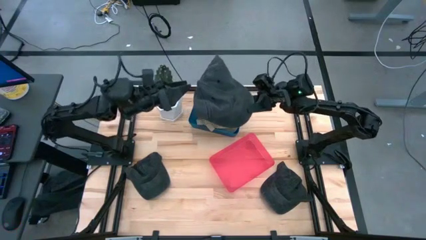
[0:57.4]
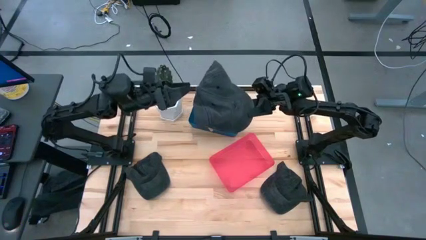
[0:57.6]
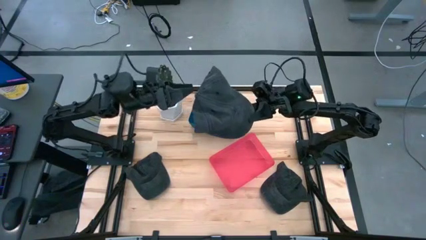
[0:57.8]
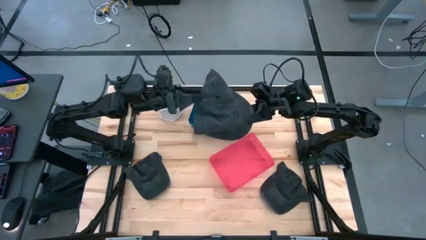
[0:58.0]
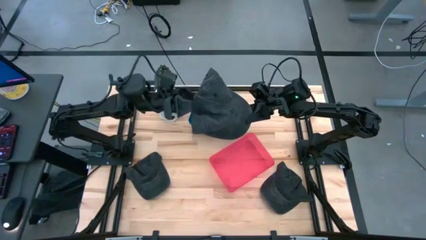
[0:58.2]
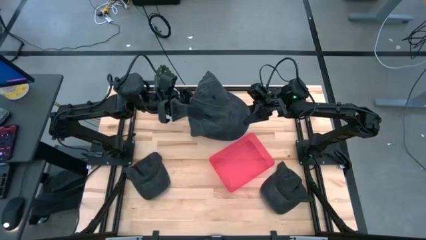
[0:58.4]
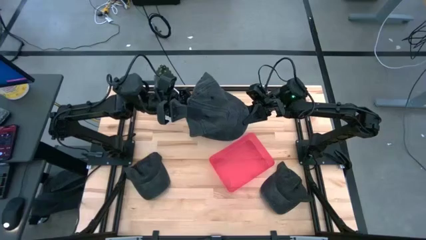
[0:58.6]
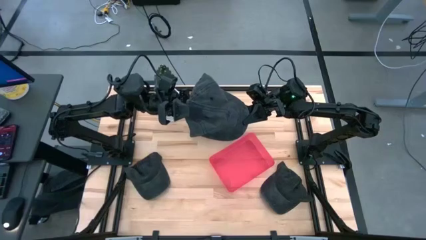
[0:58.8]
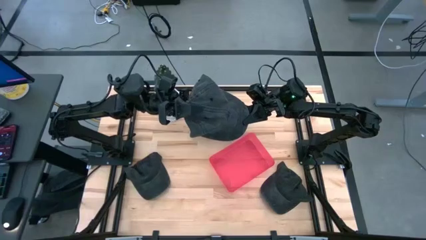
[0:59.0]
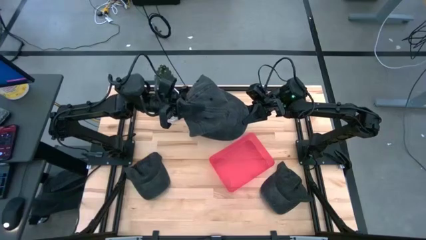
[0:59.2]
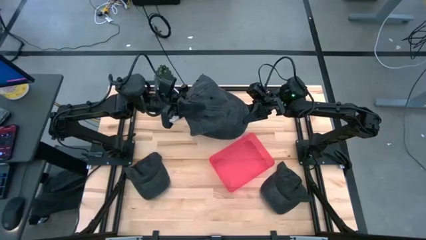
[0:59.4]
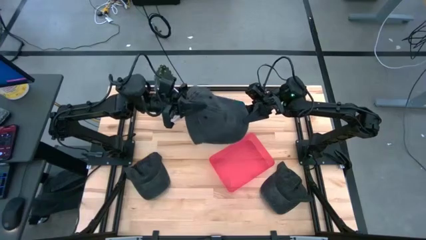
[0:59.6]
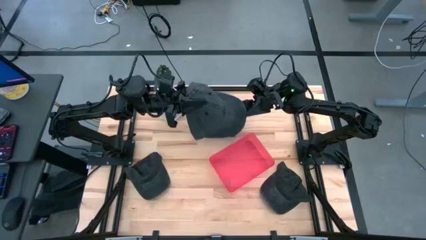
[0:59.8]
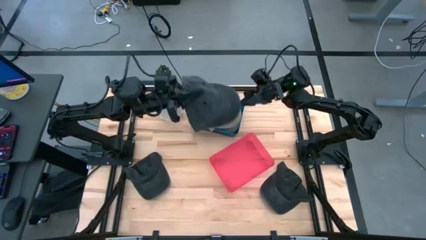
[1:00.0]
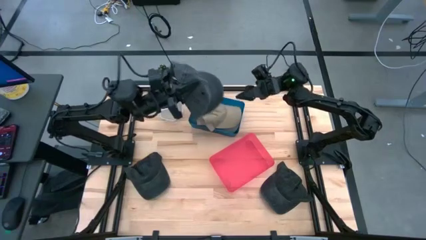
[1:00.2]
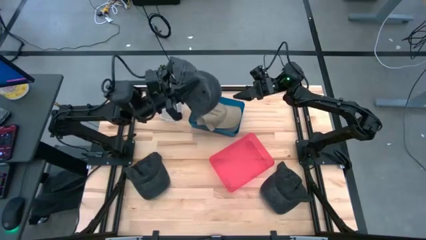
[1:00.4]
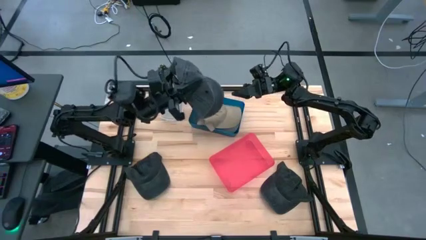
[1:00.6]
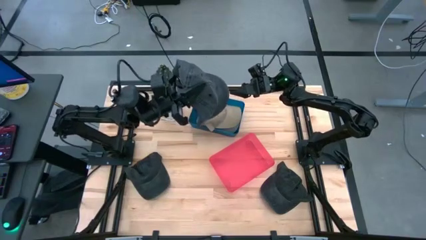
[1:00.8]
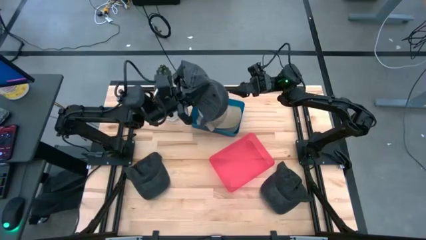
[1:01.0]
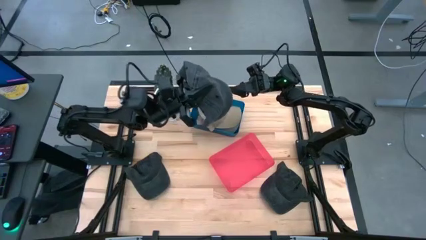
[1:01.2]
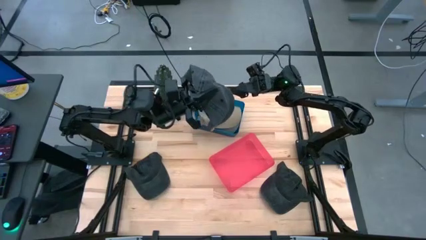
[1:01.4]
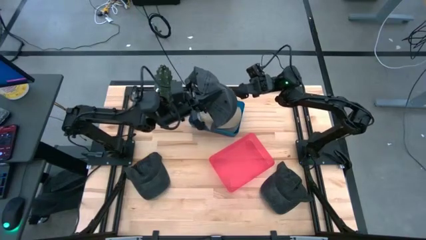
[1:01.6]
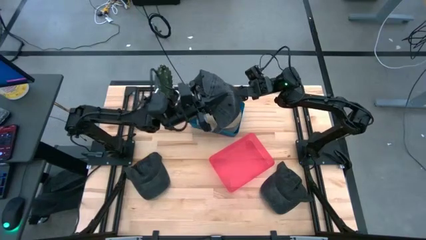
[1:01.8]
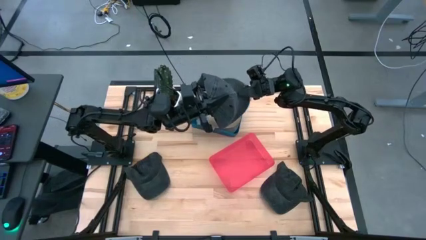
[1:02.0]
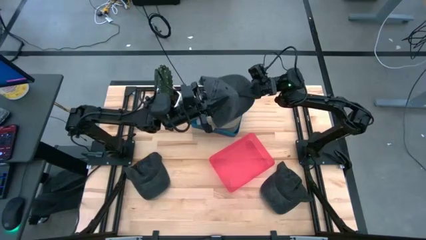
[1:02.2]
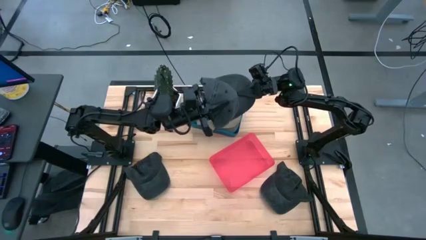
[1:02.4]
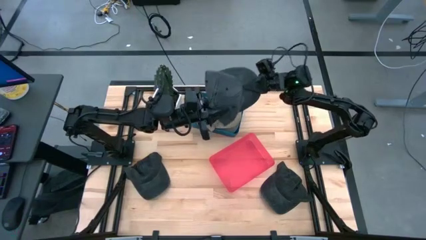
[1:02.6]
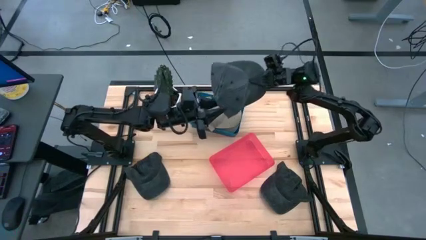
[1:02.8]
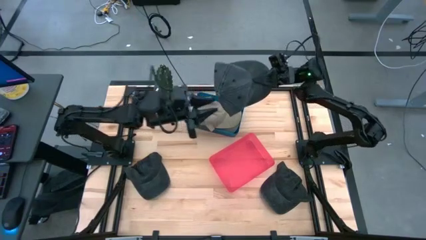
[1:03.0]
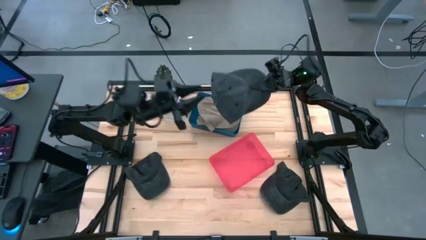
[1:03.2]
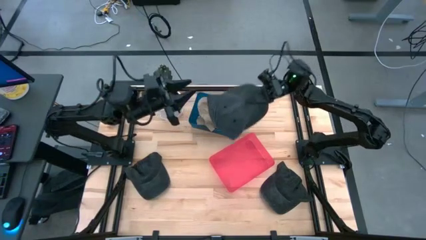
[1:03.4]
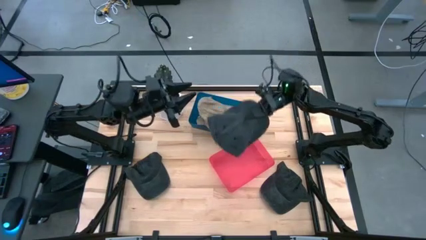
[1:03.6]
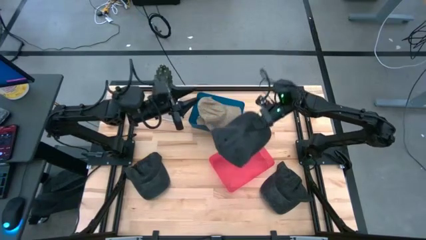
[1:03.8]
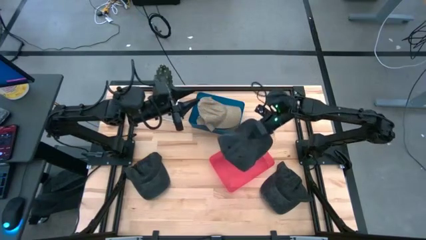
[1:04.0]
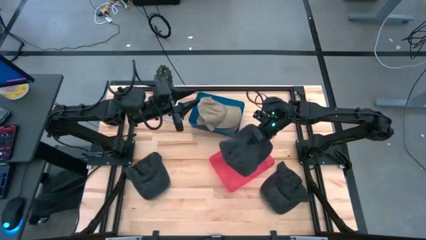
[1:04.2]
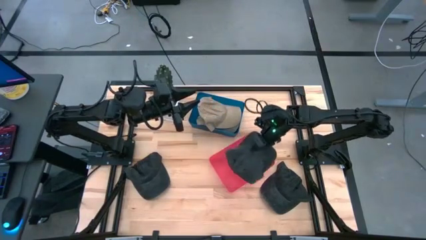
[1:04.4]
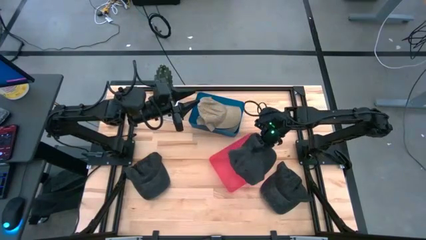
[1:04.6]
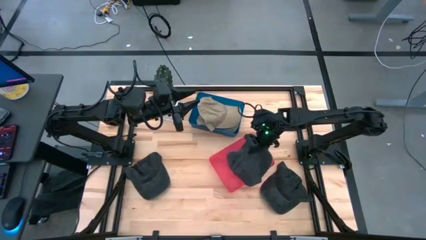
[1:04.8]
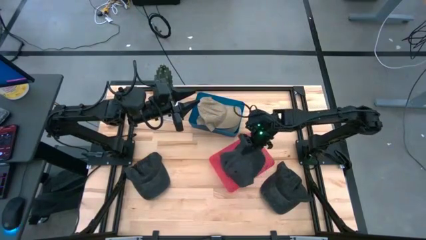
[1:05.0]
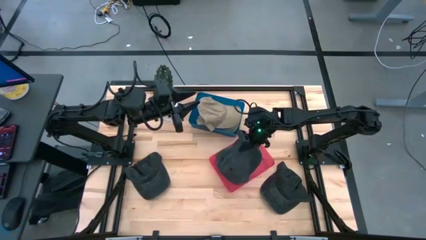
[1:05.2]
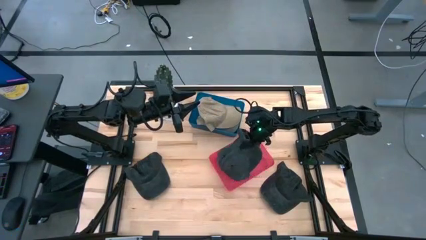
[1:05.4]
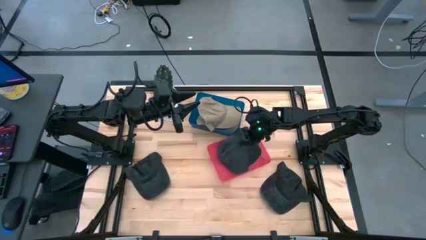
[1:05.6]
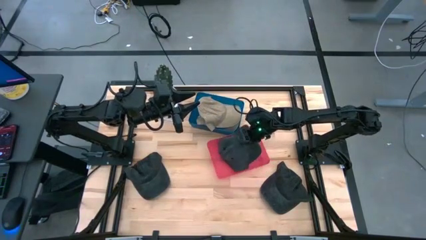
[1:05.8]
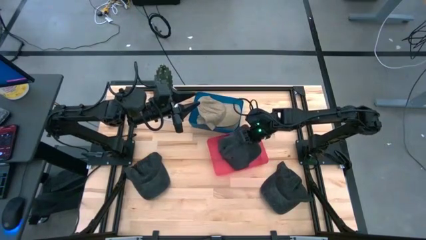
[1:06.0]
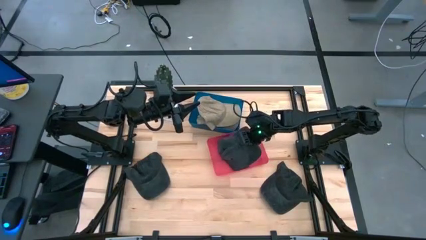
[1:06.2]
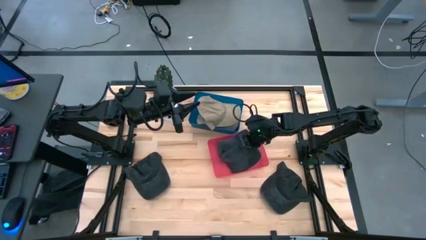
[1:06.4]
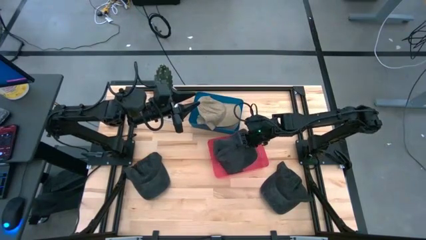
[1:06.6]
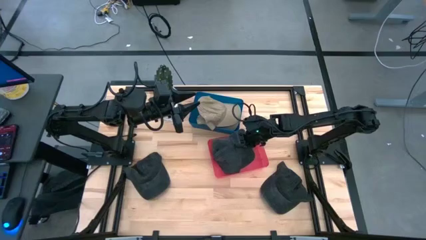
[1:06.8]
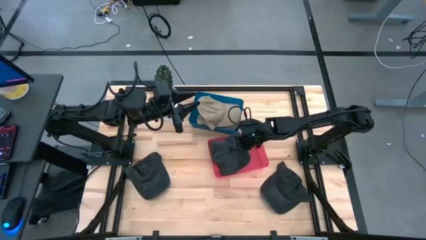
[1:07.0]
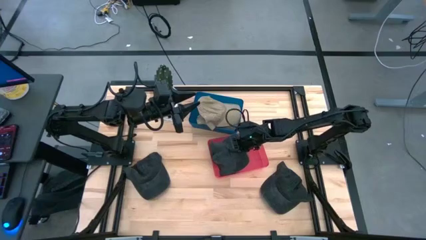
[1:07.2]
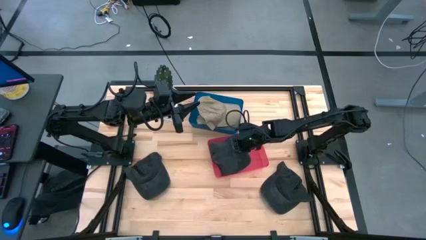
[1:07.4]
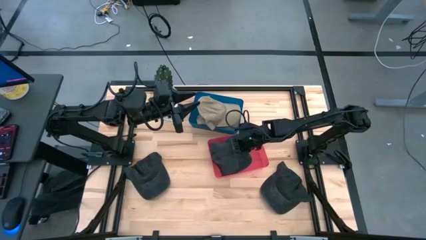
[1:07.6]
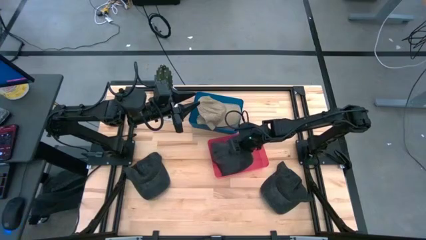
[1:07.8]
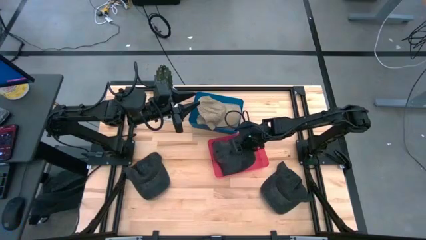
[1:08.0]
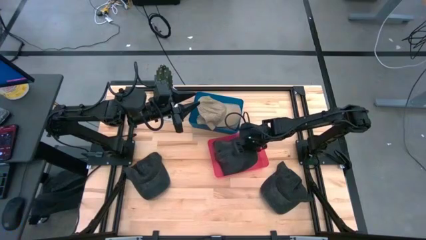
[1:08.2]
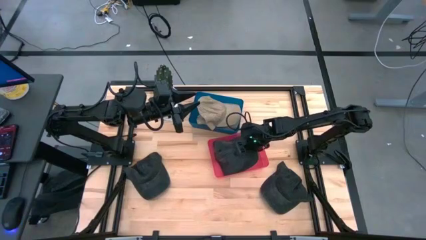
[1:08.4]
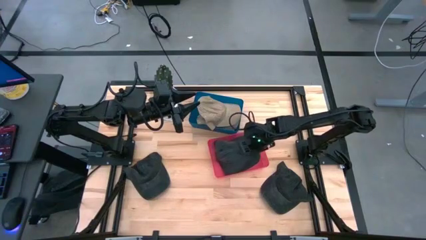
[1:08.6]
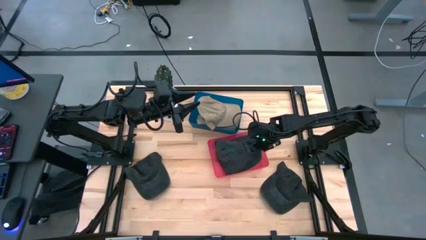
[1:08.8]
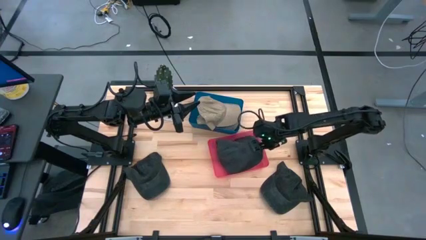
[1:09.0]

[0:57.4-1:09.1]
Task: Pick & Place hat
Put the middle black cap into the red bin

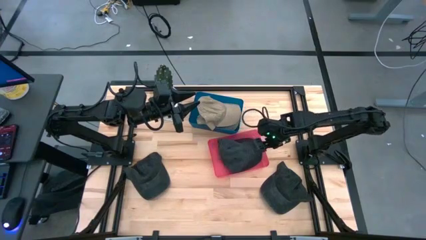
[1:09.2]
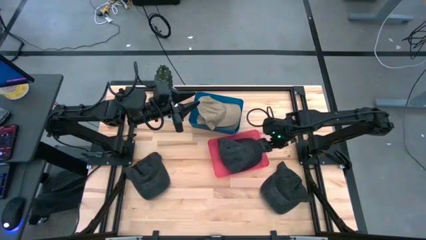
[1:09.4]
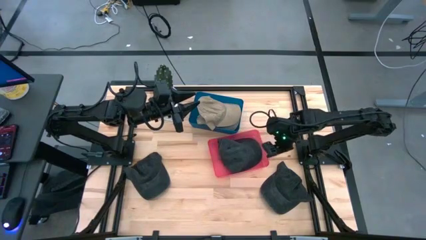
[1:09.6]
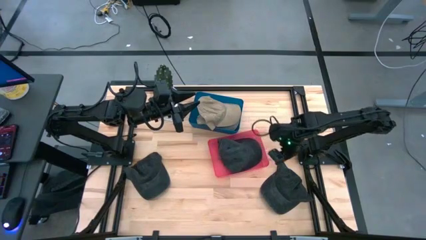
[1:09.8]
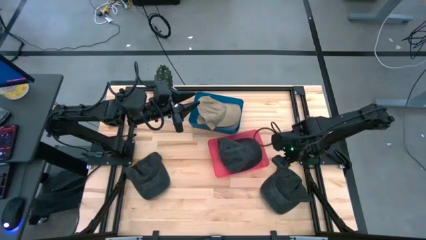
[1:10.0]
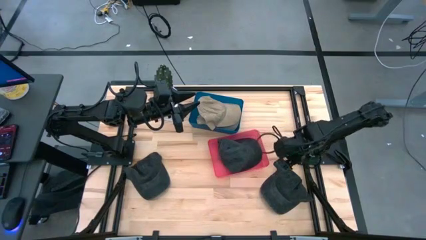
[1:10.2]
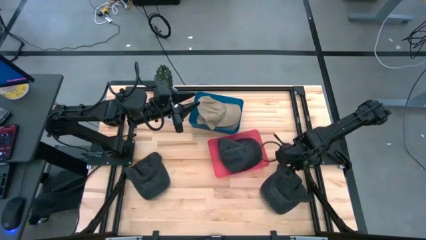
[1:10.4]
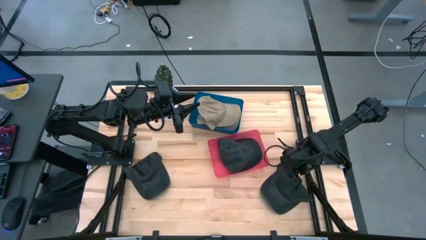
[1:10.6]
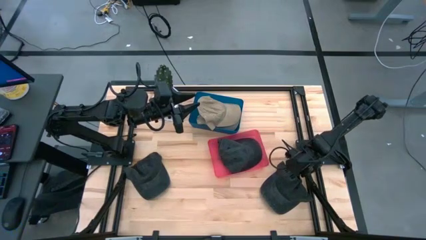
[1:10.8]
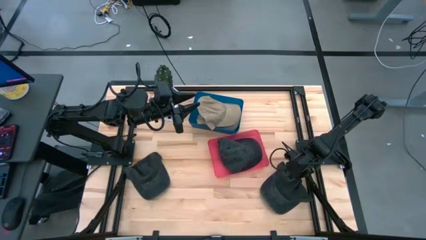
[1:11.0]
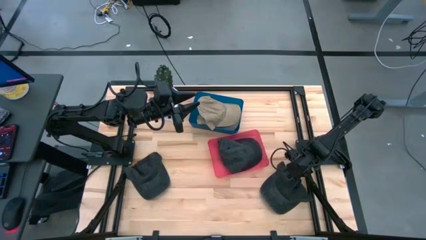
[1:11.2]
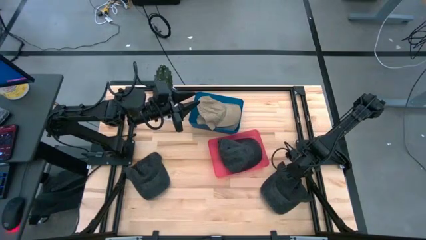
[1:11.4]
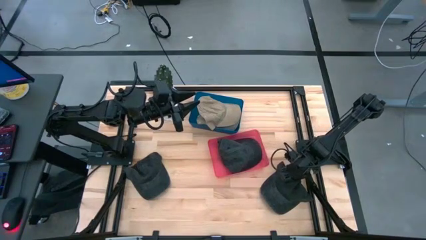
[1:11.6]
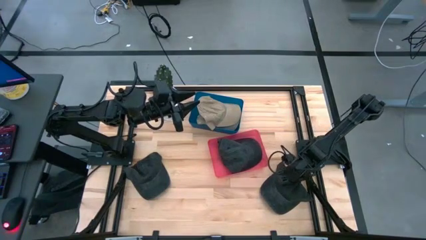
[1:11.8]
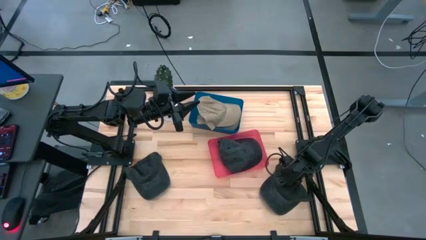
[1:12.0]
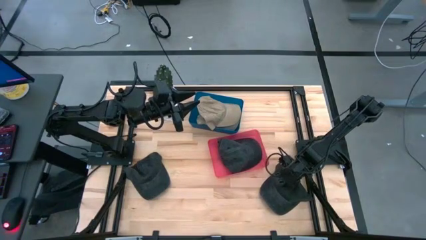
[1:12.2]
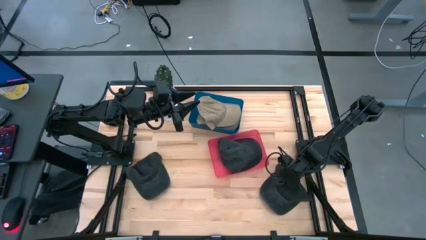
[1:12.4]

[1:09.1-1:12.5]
Put the right black cap into the red bin
